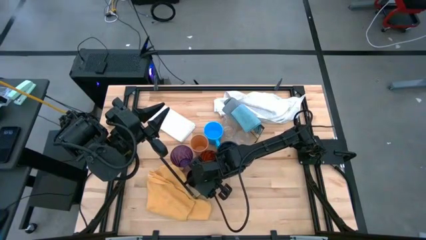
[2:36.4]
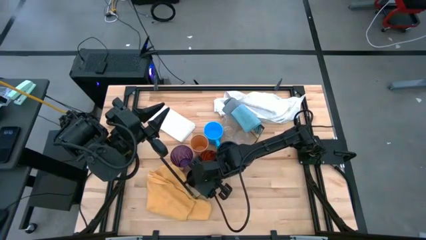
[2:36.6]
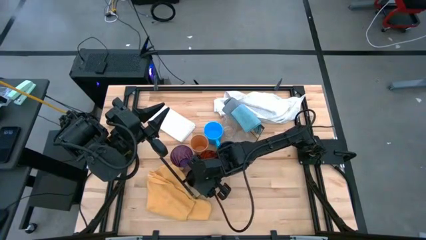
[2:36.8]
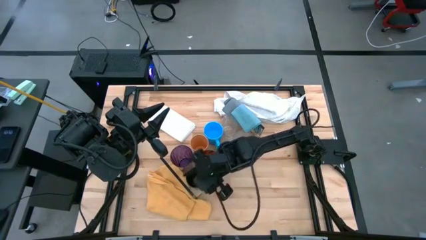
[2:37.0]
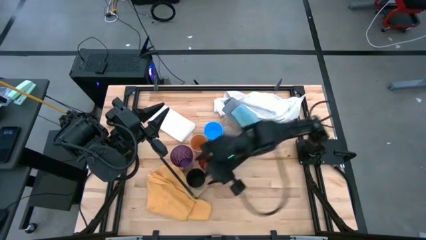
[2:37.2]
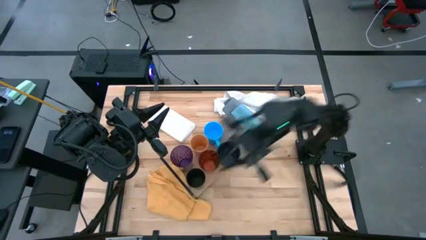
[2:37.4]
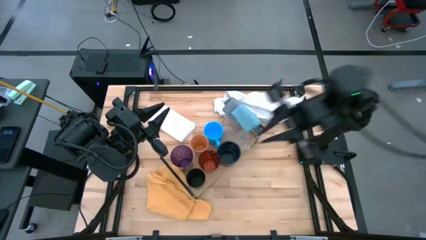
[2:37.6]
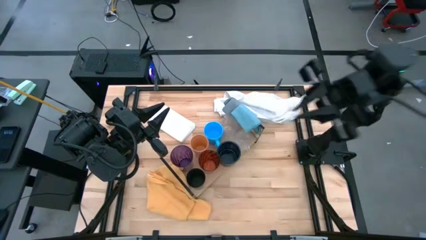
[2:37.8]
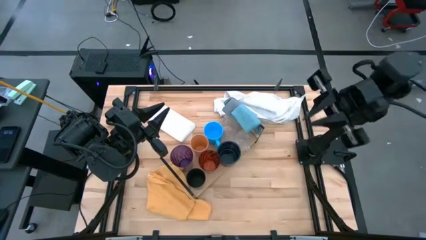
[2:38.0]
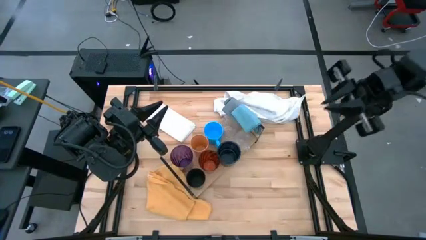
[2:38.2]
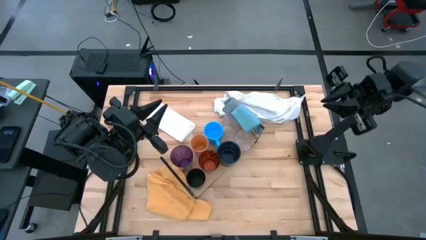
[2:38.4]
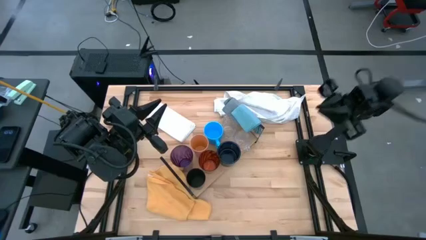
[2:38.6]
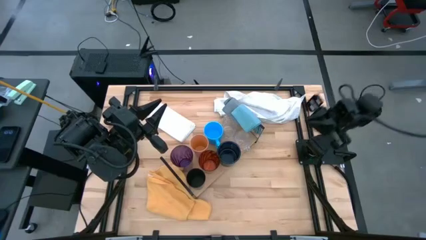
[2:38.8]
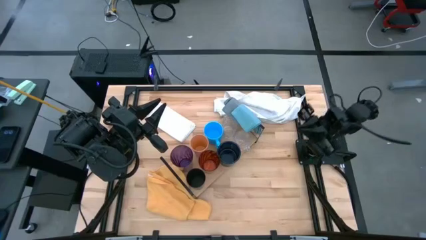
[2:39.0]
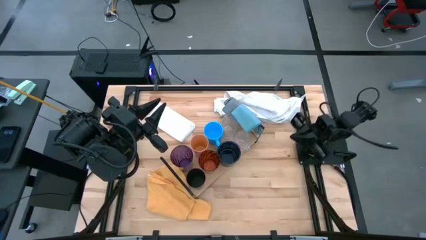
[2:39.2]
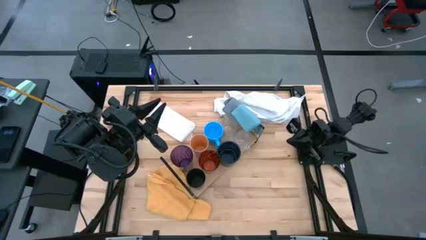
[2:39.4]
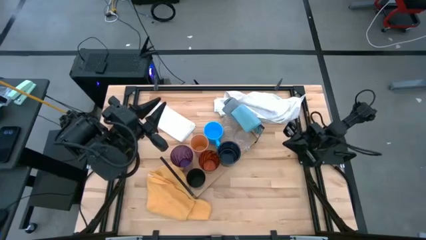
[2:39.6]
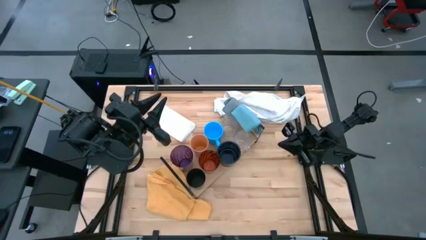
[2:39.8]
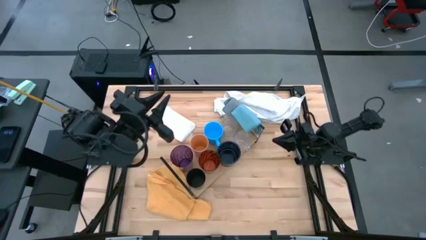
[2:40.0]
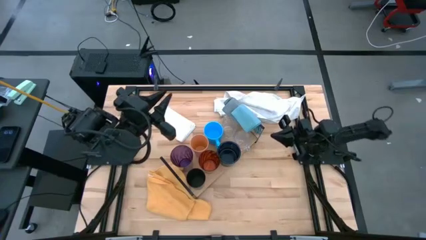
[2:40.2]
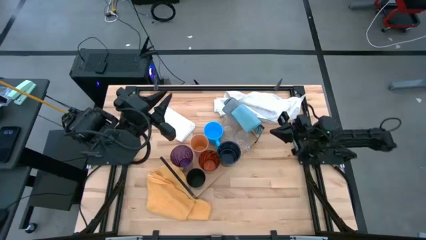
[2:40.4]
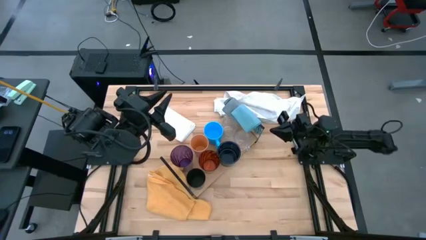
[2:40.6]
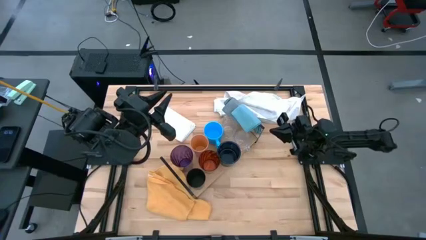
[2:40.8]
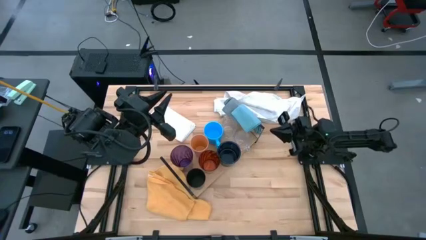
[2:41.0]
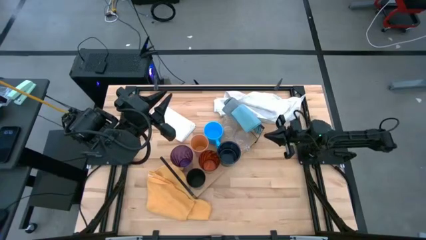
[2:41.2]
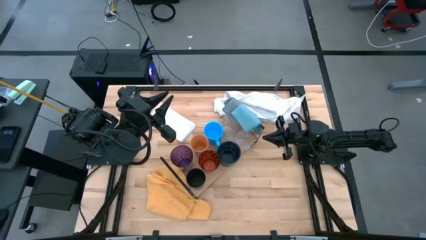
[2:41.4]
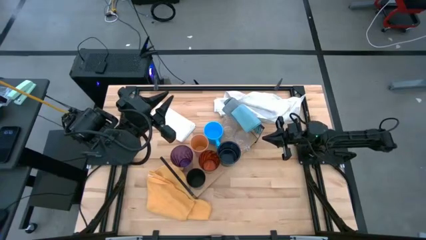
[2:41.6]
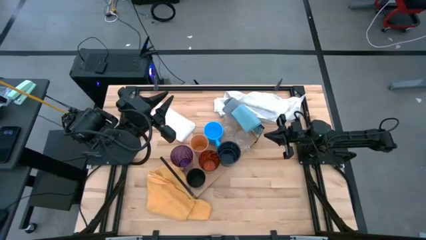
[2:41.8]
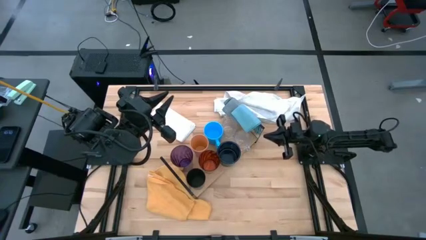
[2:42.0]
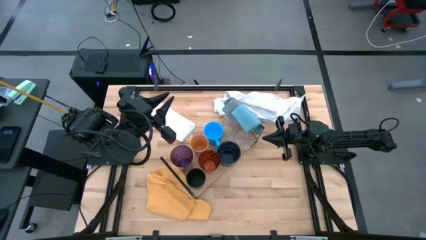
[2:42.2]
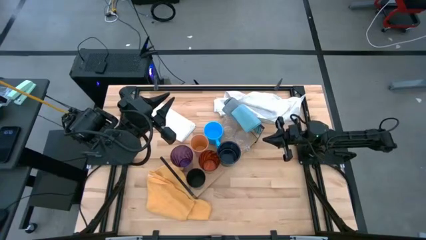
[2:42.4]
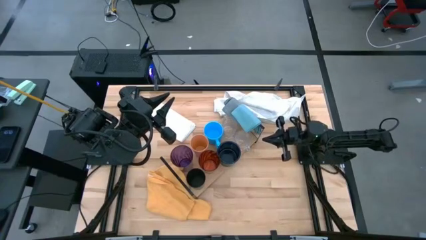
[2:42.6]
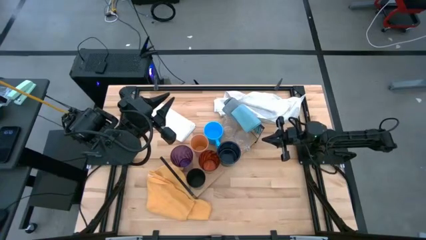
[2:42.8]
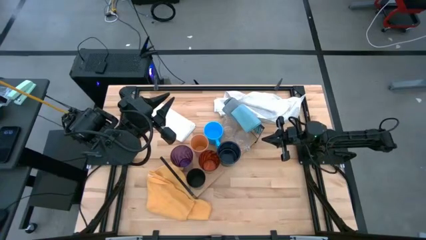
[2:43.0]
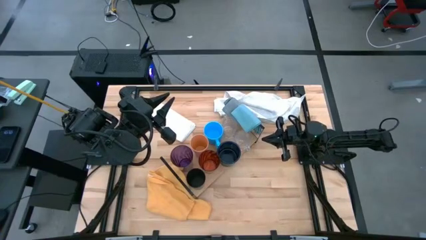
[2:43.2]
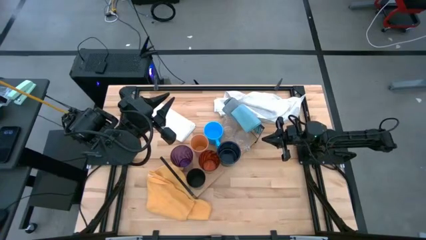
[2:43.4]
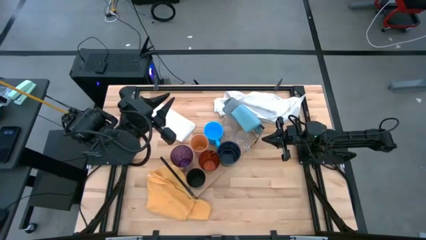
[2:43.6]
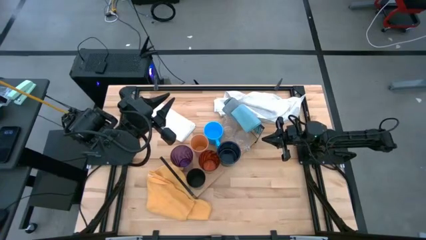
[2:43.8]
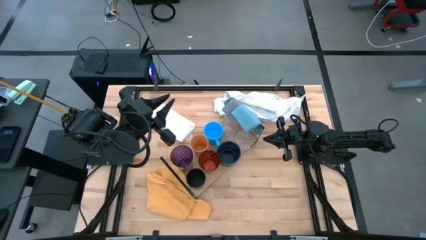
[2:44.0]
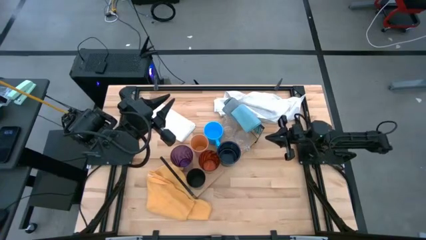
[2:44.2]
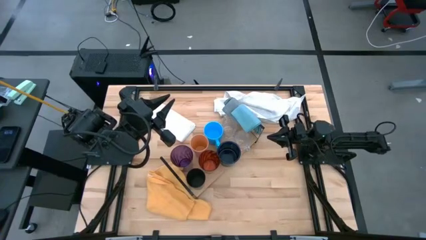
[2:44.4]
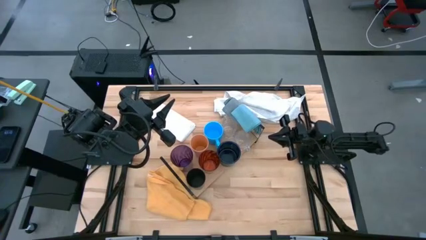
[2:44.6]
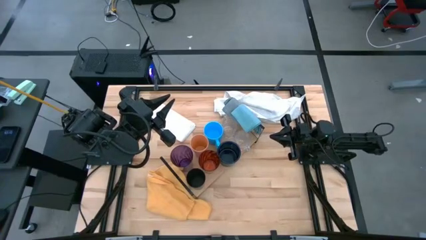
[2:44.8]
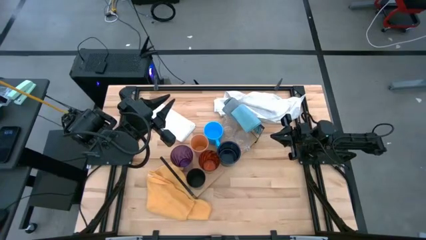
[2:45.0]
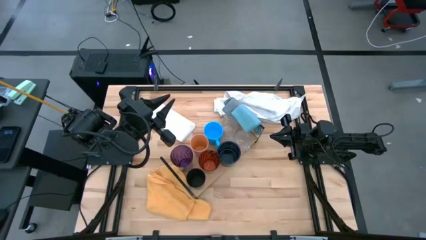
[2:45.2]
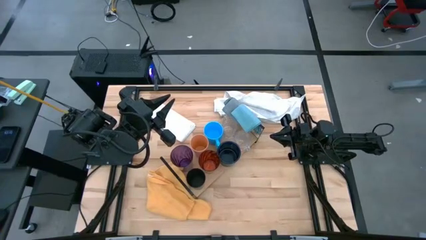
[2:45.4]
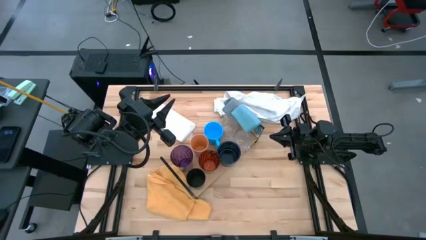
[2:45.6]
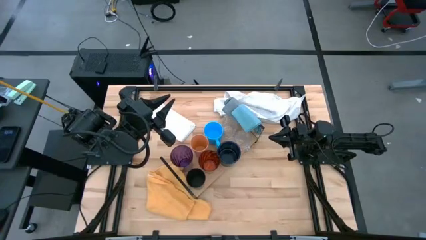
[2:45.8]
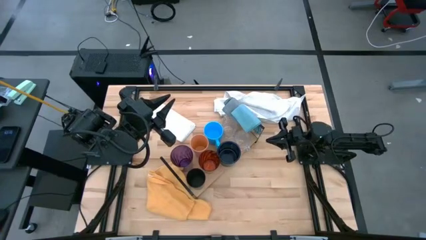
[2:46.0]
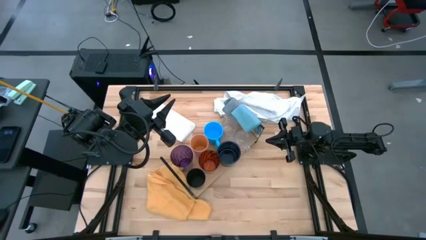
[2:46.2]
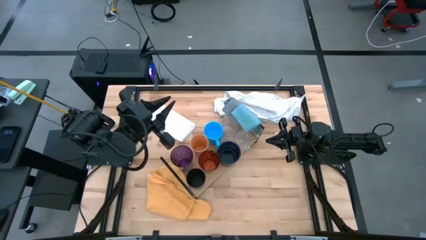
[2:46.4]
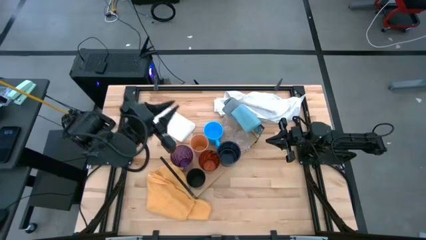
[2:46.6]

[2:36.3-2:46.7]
Task: Stack small to large cups/mugs on shelf
Return to Home Position

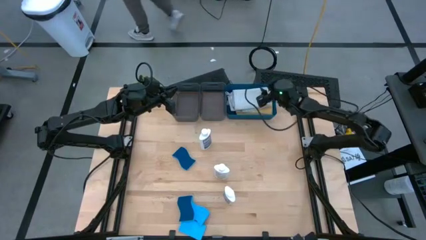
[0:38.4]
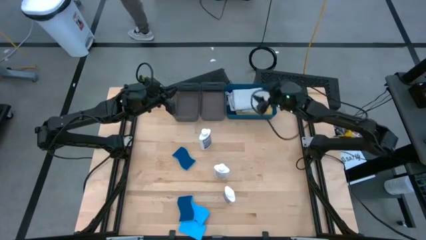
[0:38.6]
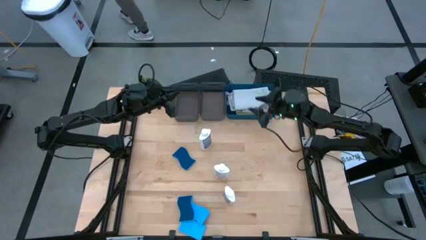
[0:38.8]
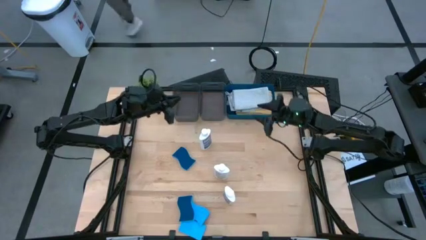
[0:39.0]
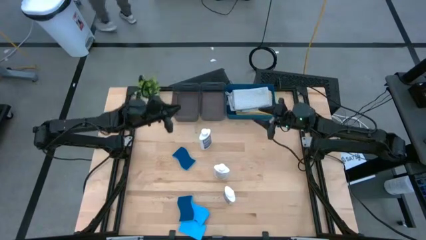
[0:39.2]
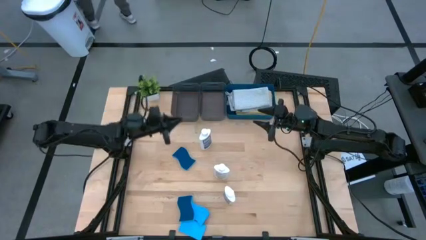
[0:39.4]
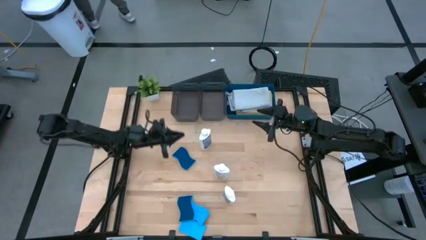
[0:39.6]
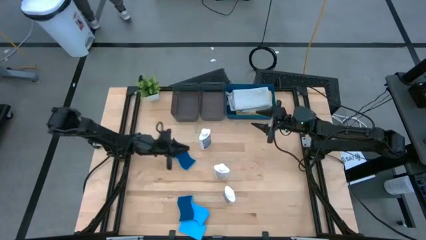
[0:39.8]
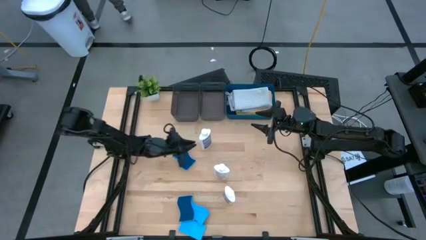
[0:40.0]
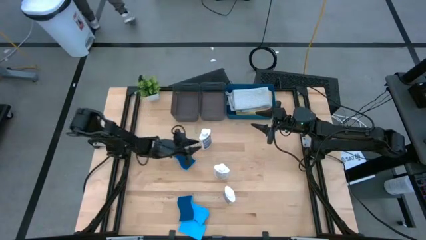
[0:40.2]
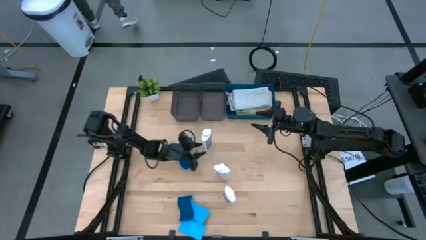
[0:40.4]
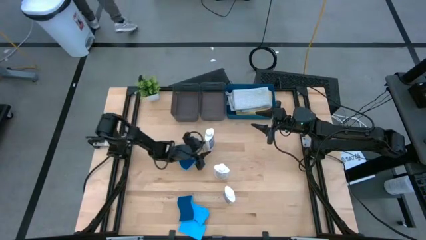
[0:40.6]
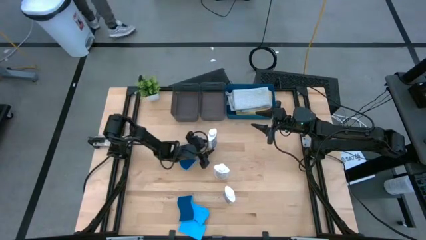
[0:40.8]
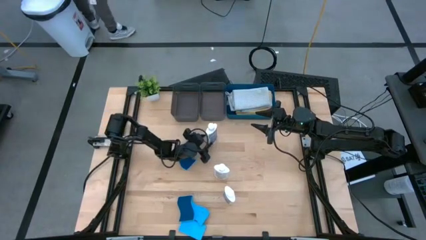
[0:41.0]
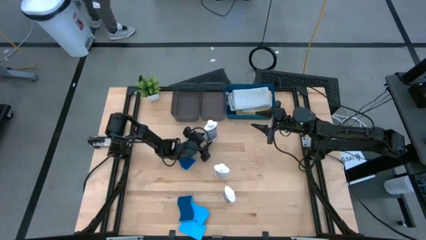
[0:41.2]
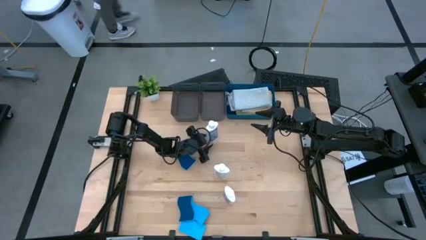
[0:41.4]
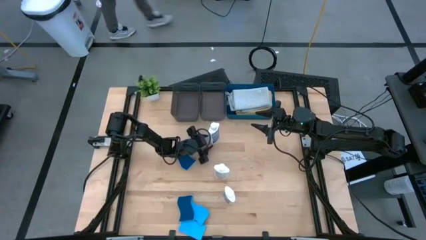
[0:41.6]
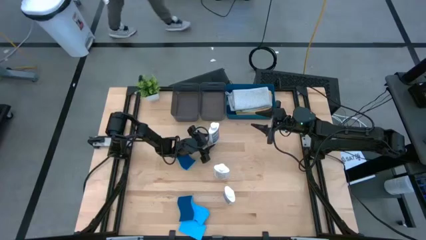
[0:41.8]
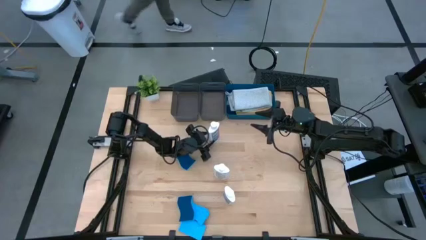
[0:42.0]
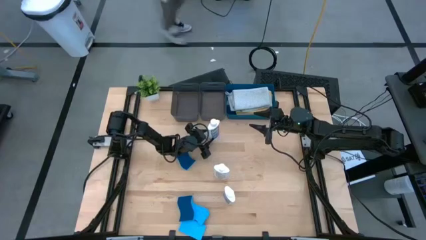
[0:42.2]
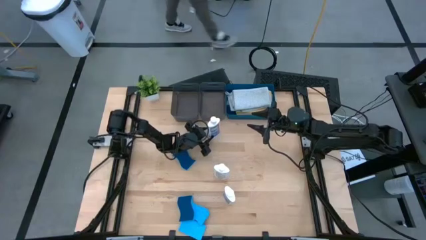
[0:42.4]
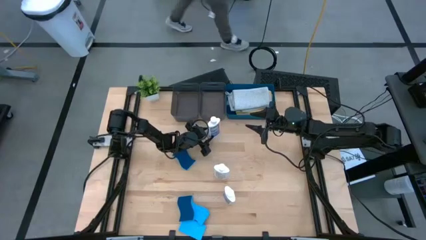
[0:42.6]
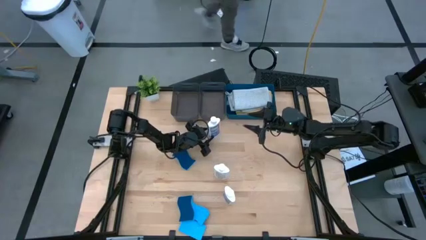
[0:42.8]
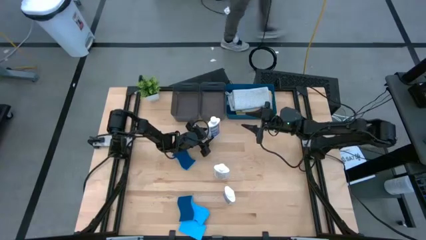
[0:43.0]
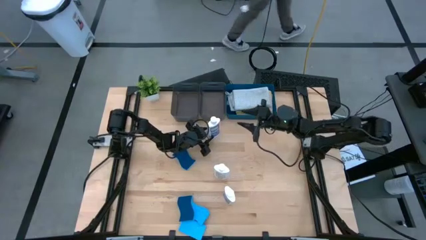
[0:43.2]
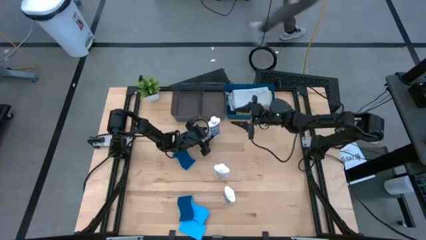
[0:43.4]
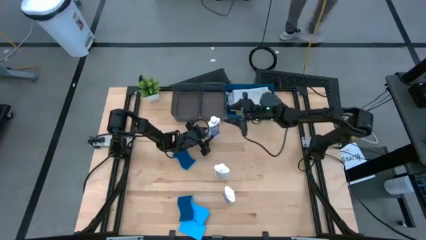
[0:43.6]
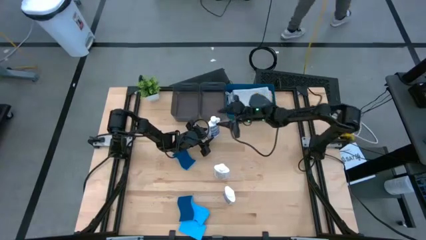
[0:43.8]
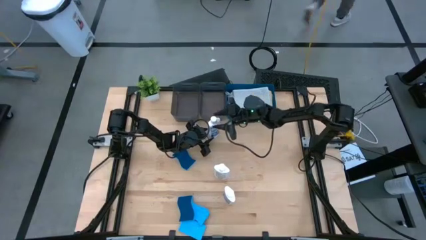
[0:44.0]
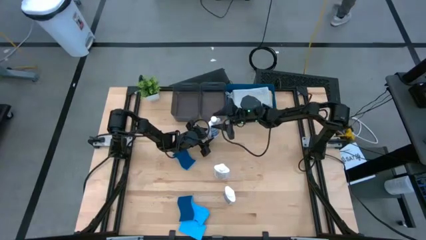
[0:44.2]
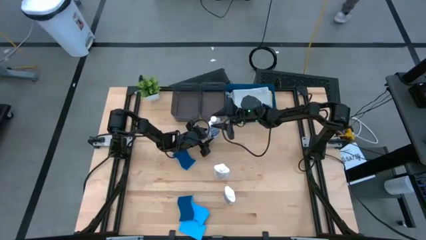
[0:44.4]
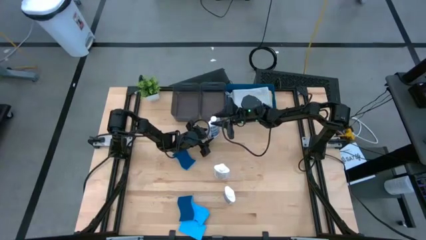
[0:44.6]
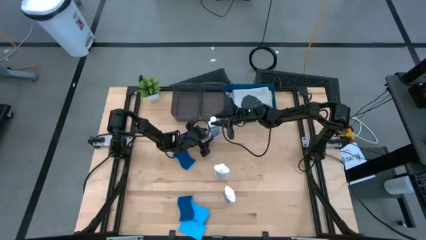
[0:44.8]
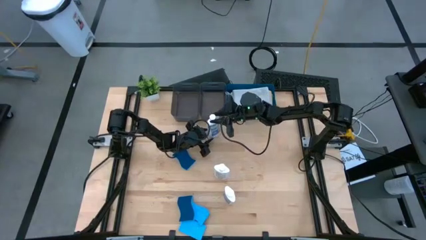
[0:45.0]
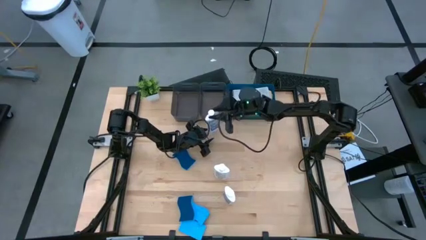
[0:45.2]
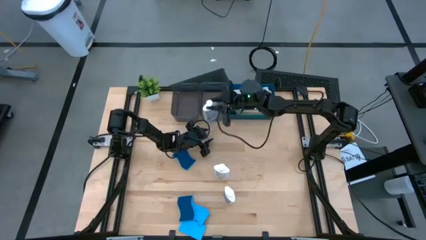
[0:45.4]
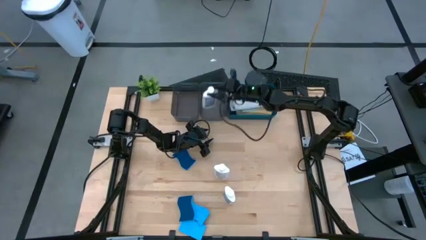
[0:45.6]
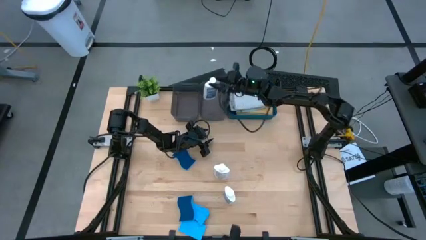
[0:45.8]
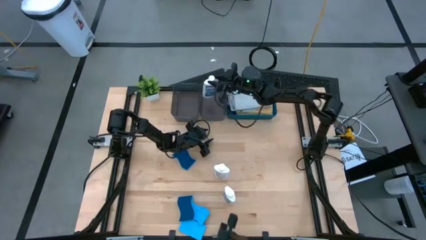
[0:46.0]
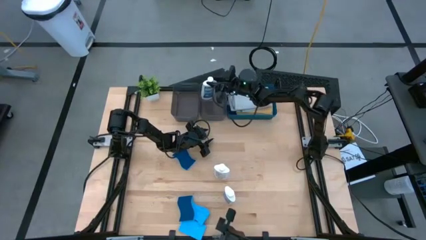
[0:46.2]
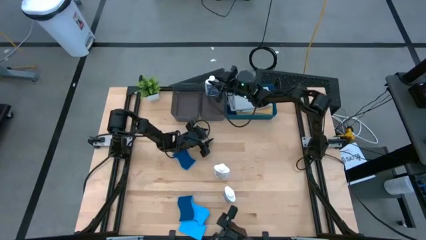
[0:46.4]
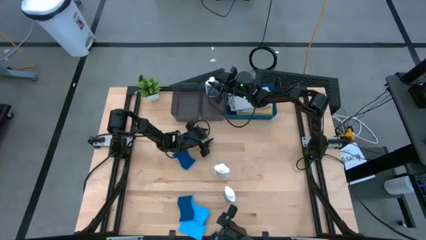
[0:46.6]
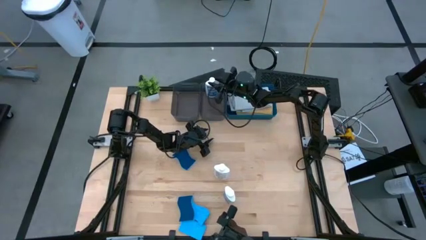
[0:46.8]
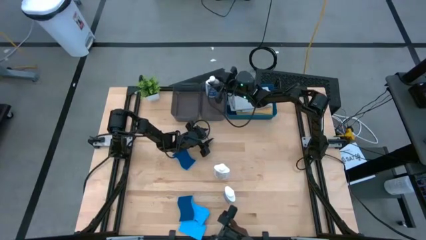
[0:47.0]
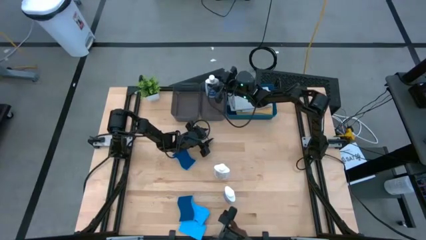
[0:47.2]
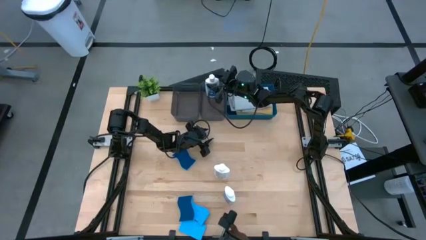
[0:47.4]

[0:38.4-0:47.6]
Task: Pick & Place Kitchen Items
Put the top white plastic restorer bottle into the right black bin
